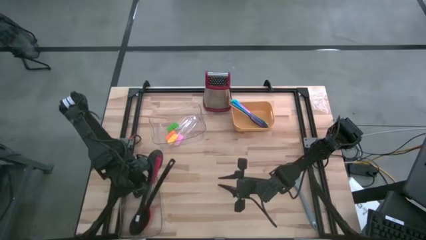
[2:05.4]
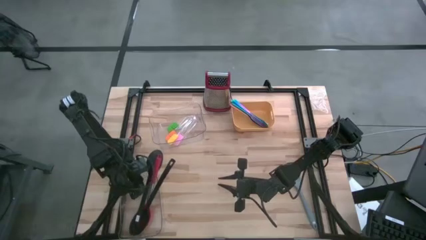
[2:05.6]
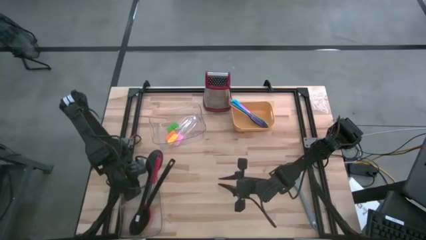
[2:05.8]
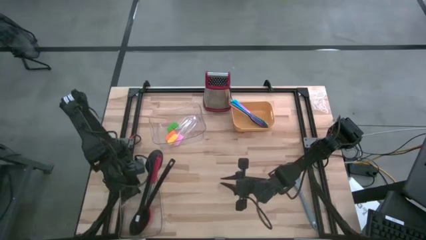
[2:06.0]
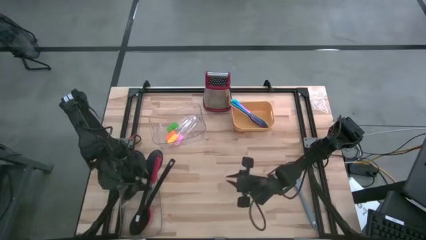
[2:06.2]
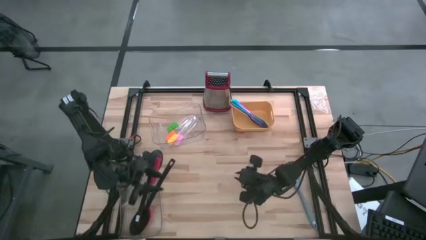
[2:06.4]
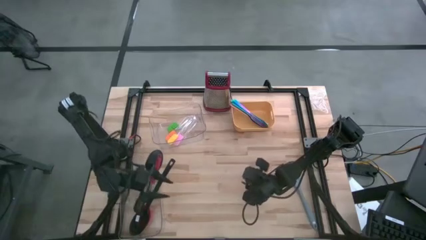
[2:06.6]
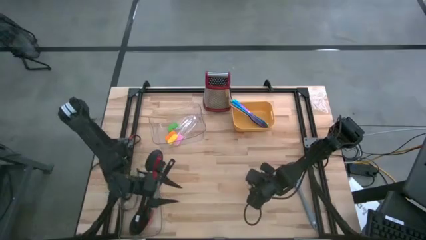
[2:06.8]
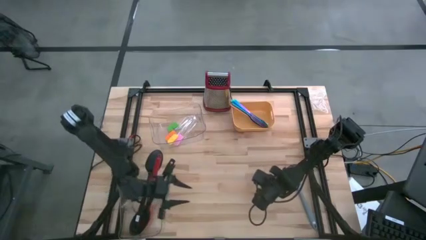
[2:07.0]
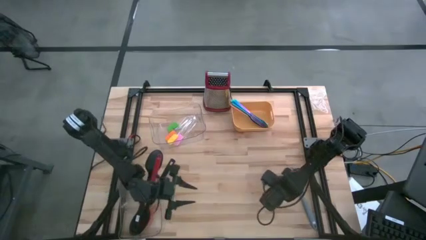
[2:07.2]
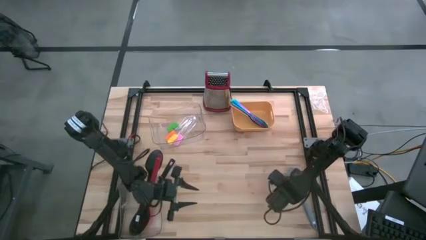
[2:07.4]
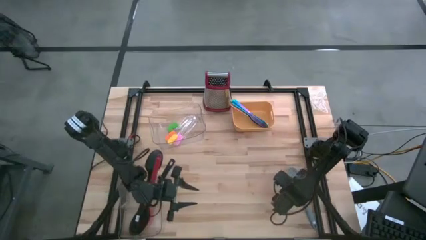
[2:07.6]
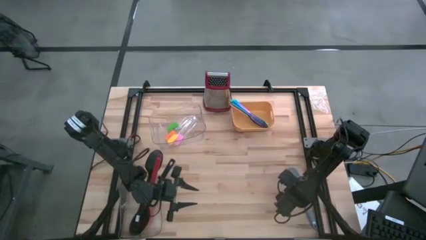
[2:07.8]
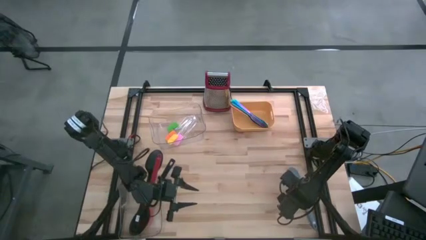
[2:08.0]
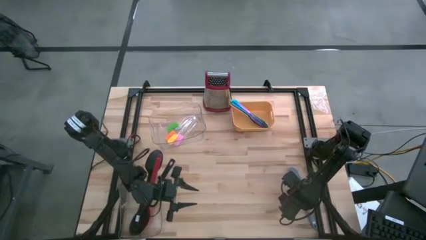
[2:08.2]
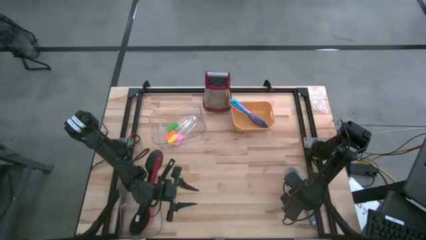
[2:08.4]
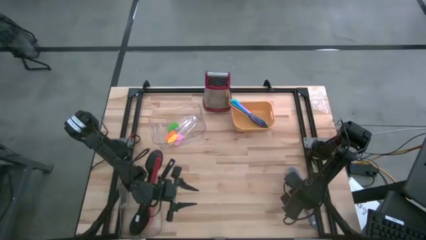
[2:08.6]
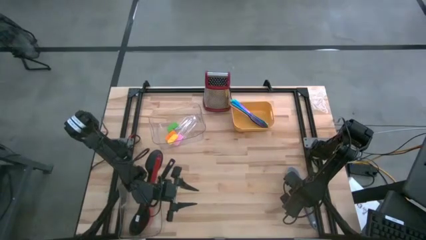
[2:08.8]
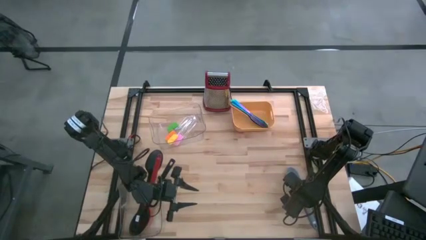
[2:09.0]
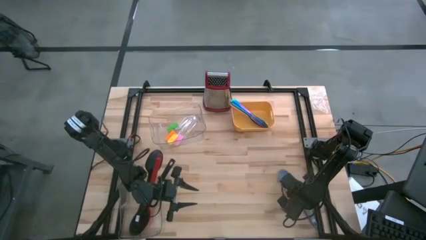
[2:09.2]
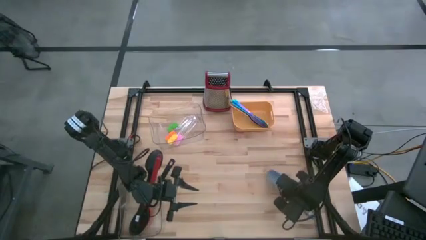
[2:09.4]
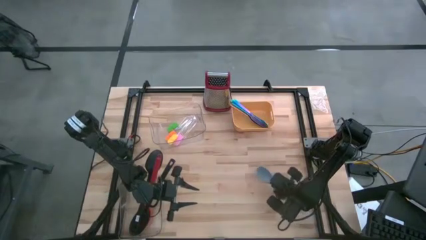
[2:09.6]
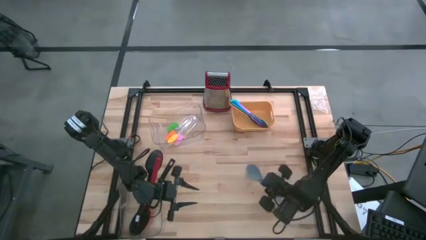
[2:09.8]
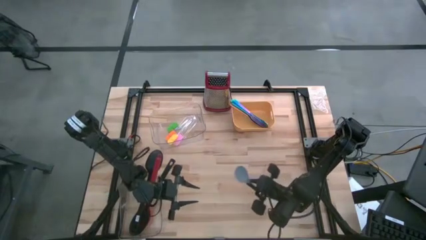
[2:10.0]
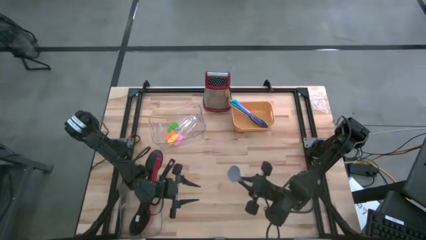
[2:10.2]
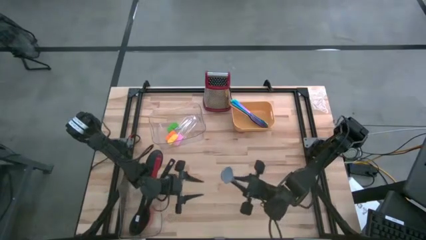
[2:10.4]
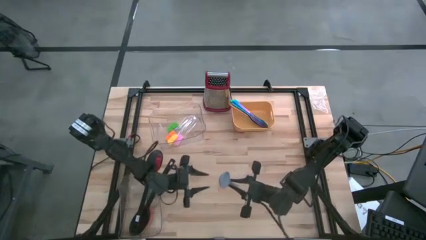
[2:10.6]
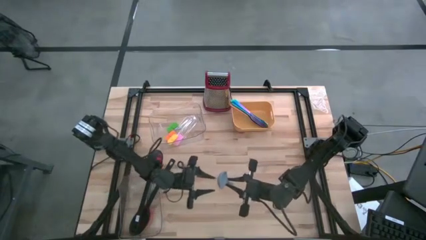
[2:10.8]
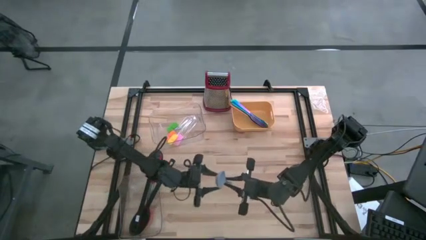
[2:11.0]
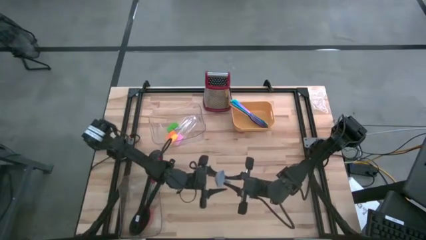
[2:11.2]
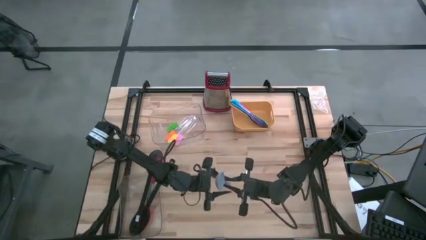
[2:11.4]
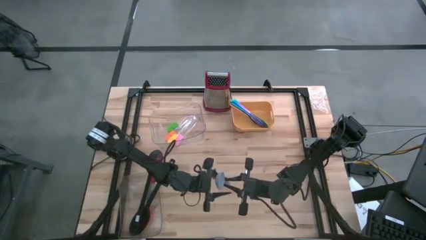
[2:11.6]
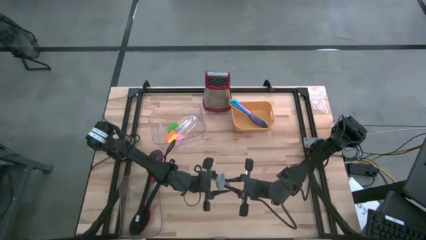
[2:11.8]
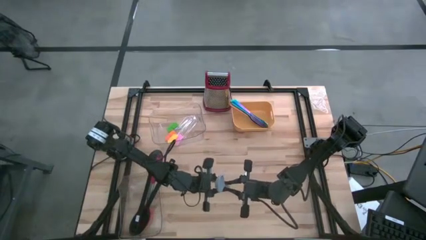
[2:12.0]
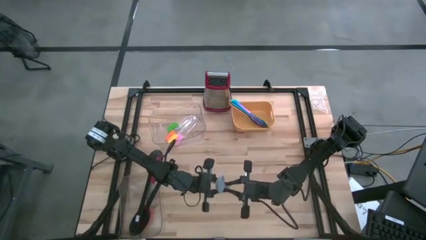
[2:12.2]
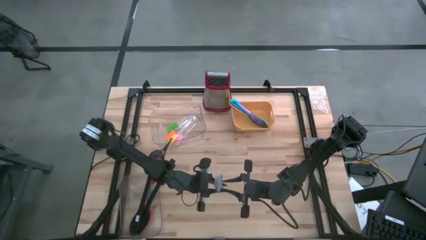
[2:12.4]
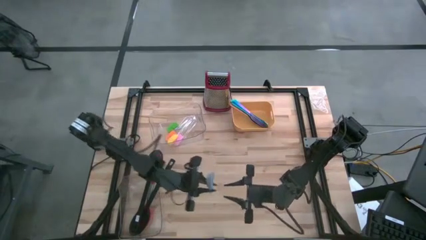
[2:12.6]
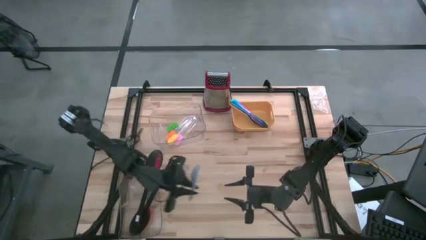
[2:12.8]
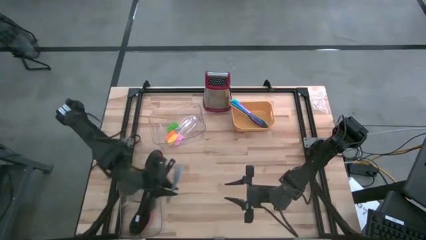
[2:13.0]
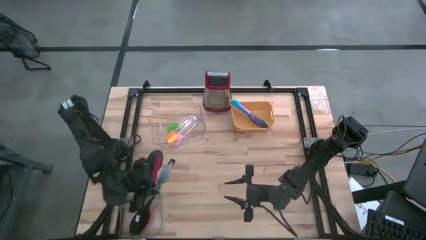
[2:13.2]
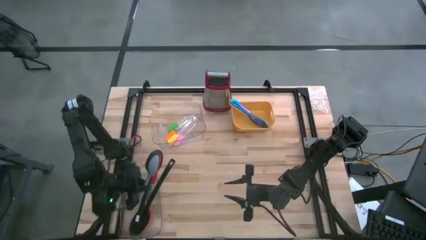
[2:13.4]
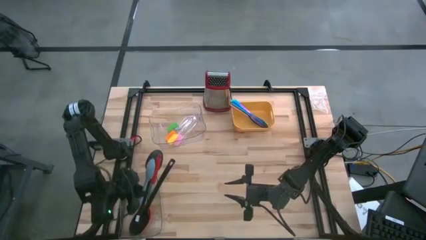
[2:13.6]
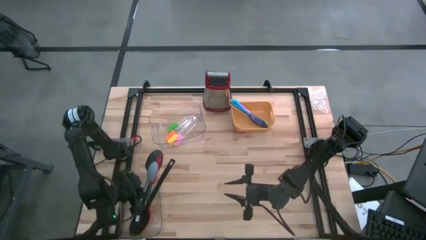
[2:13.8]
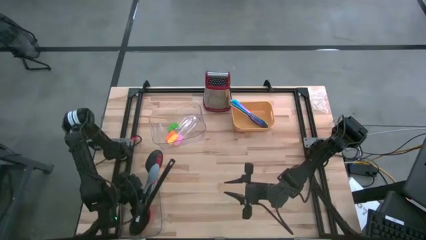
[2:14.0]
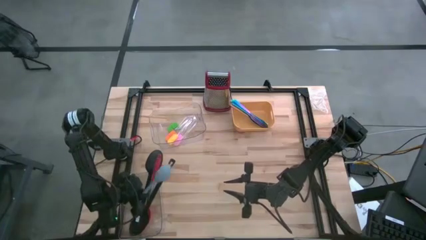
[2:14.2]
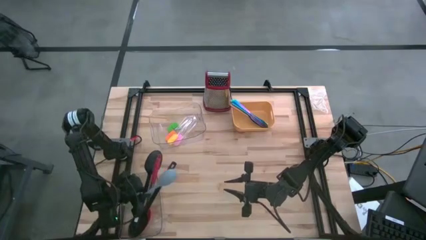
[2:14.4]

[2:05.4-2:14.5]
Task: Pick & Place Kitchen Items
Put the gray serving spoon into the bottom transparent bin

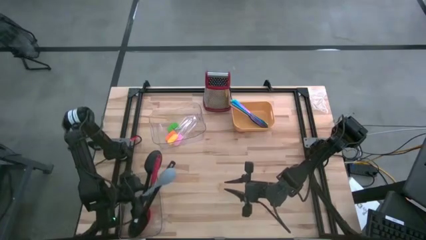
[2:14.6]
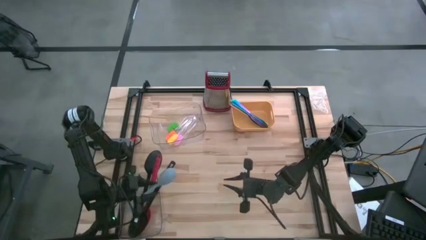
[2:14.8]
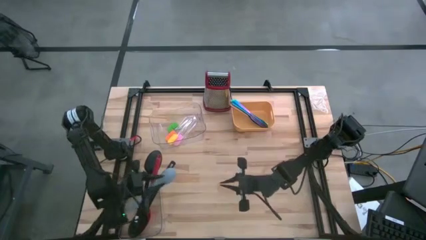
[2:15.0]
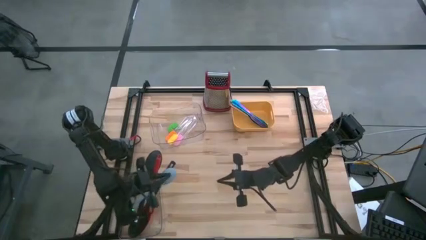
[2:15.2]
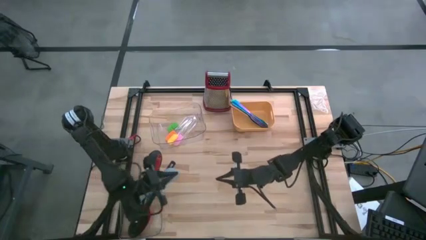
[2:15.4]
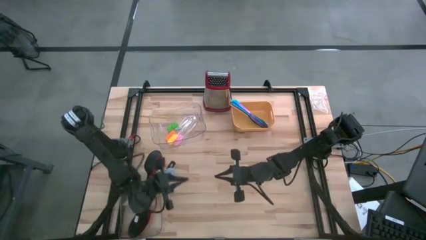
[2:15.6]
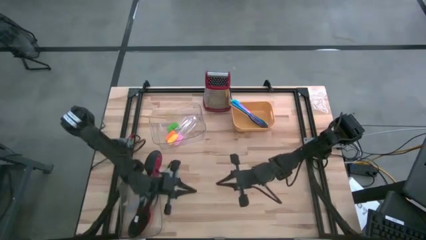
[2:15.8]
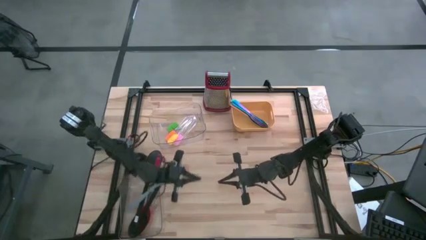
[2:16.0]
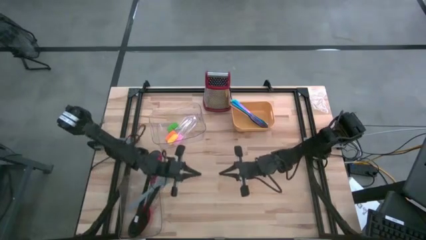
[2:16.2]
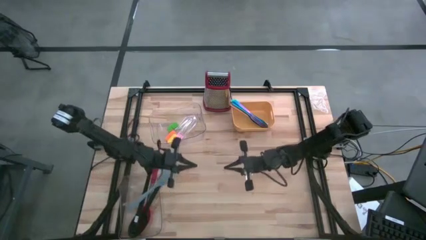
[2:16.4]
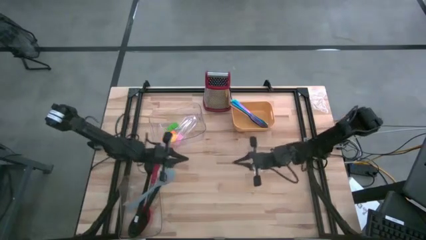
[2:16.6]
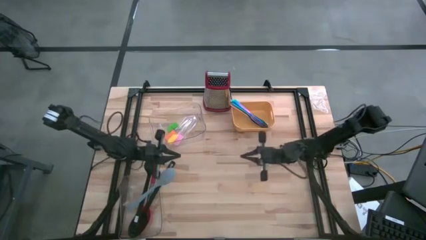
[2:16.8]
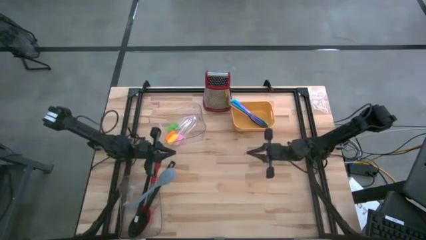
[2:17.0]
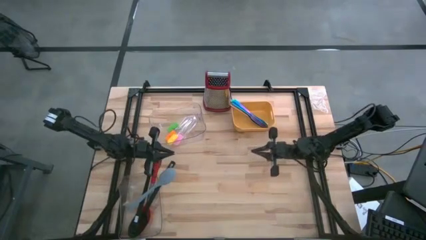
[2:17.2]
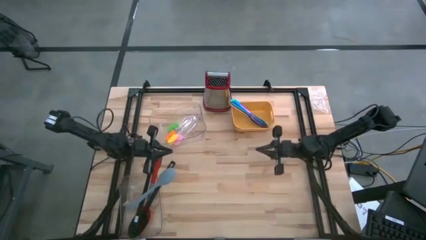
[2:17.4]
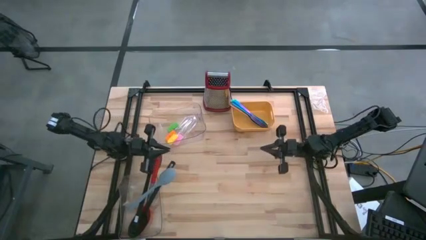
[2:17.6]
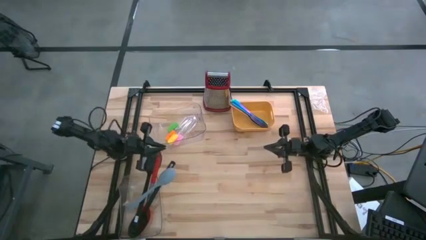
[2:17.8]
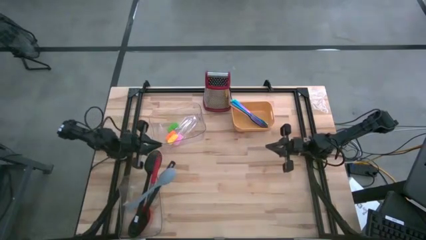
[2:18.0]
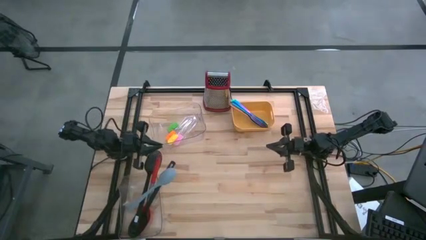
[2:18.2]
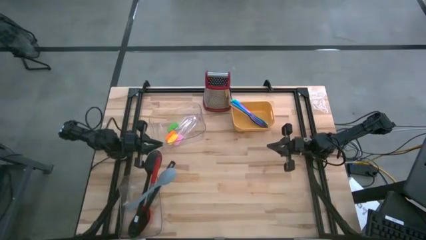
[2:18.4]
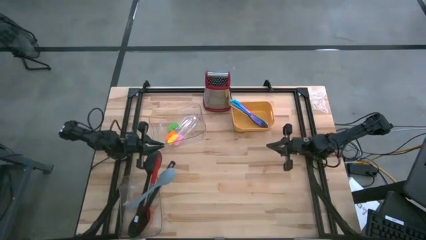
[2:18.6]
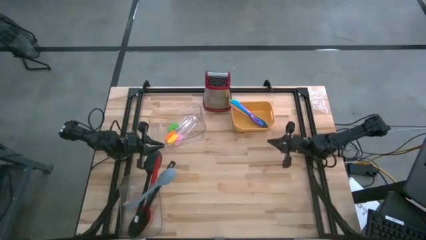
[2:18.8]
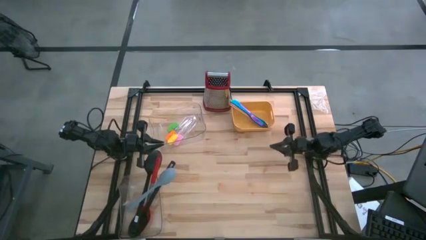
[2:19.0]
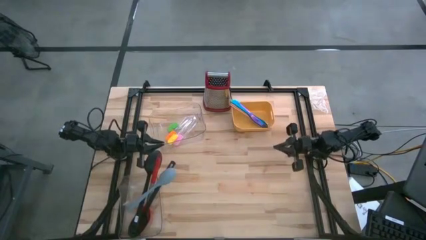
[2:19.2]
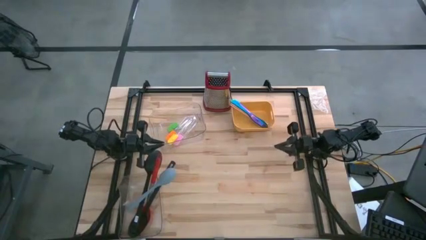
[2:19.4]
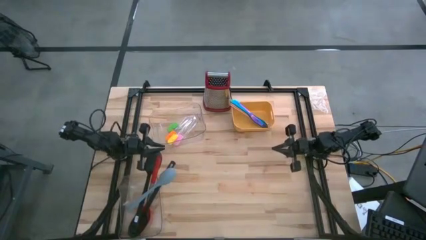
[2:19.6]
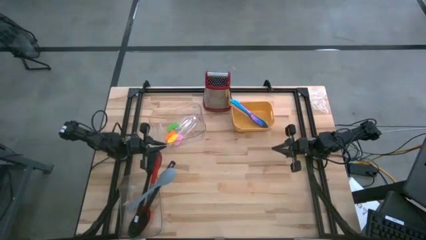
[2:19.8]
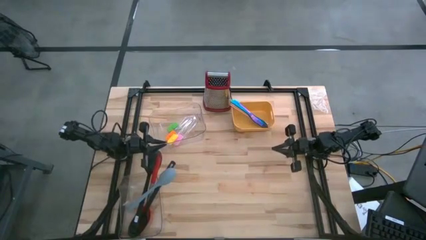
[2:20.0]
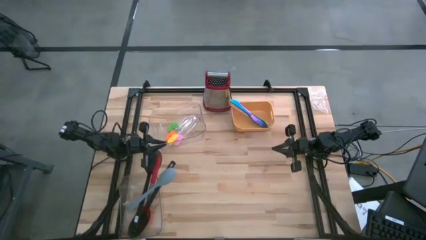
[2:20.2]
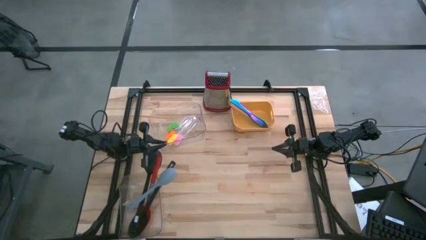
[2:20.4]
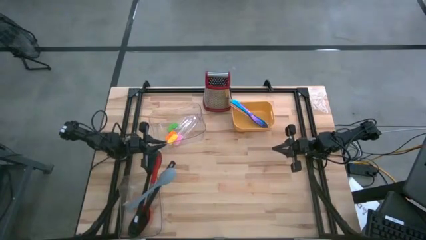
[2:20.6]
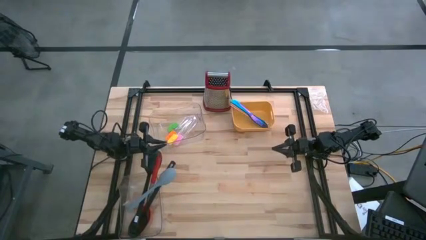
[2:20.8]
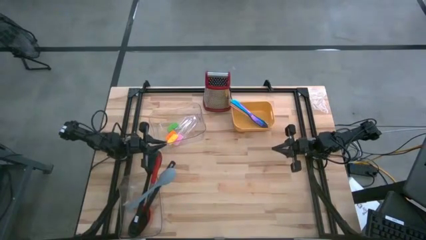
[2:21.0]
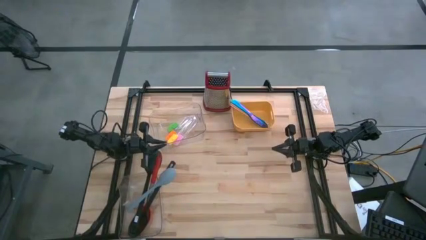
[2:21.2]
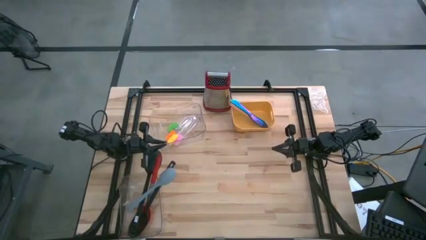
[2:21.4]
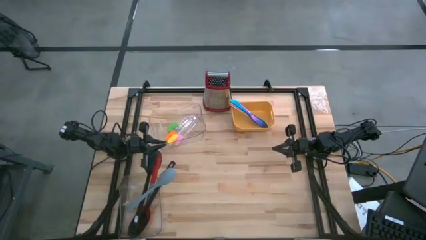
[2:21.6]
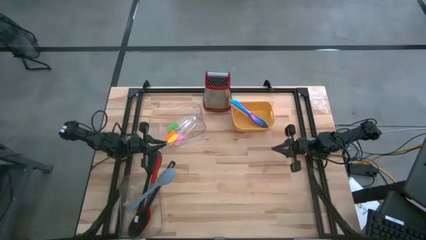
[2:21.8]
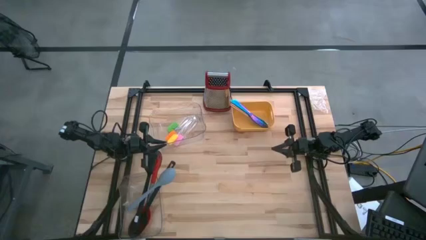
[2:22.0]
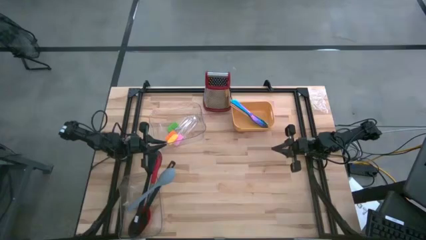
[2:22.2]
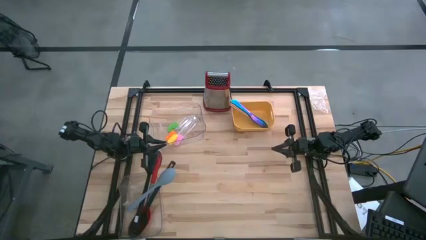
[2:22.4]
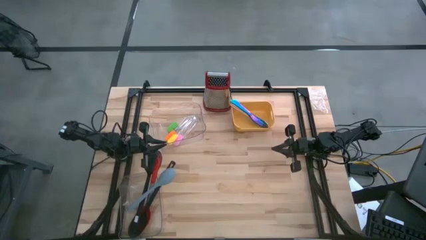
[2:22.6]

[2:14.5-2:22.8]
Return to Home Position
